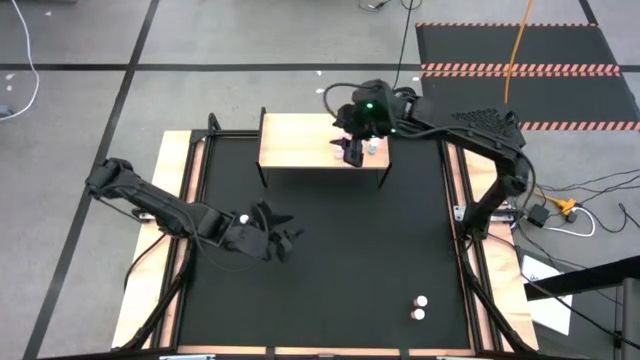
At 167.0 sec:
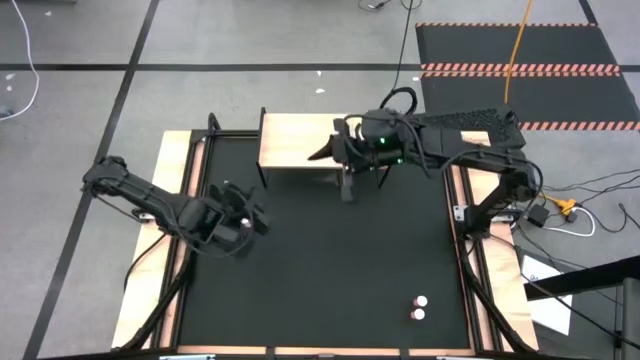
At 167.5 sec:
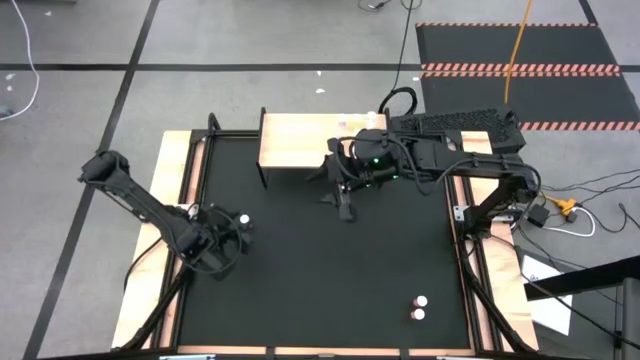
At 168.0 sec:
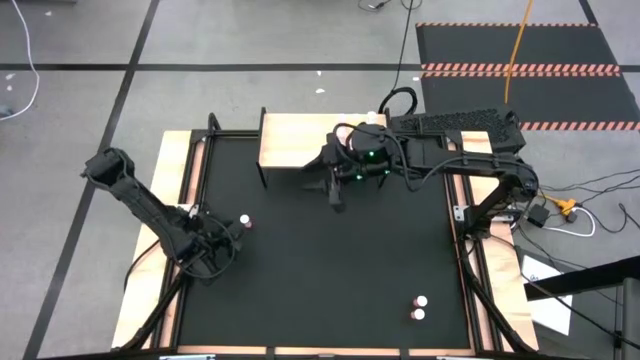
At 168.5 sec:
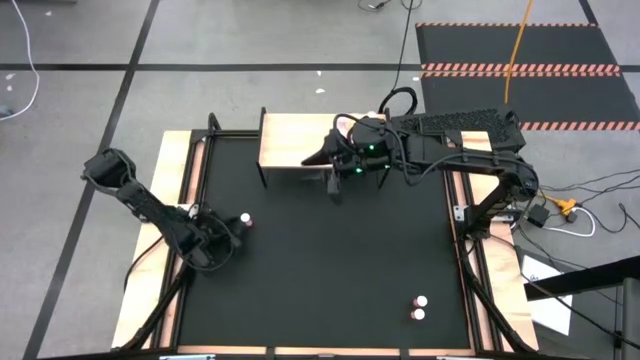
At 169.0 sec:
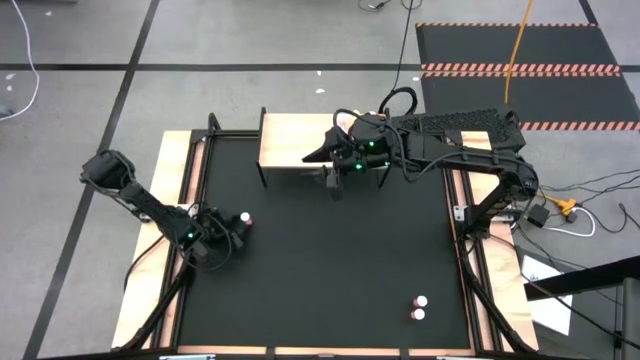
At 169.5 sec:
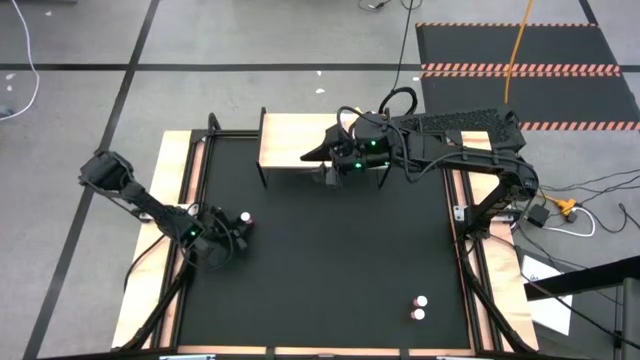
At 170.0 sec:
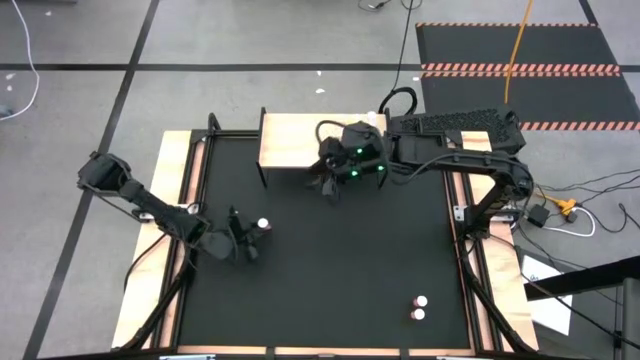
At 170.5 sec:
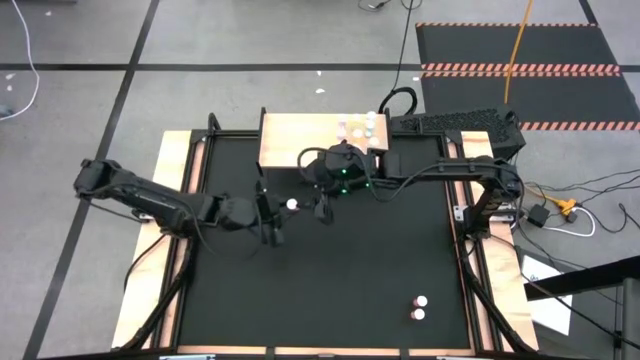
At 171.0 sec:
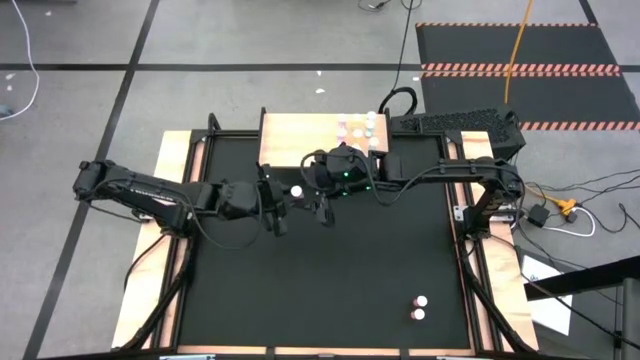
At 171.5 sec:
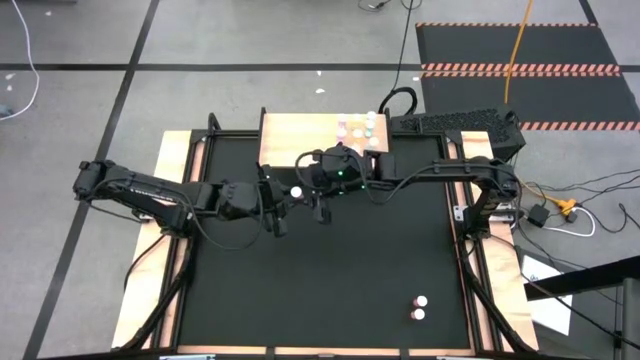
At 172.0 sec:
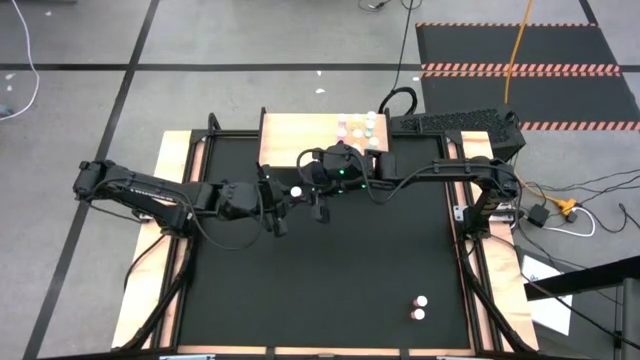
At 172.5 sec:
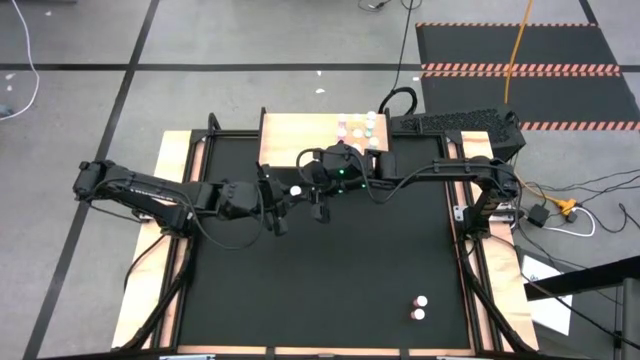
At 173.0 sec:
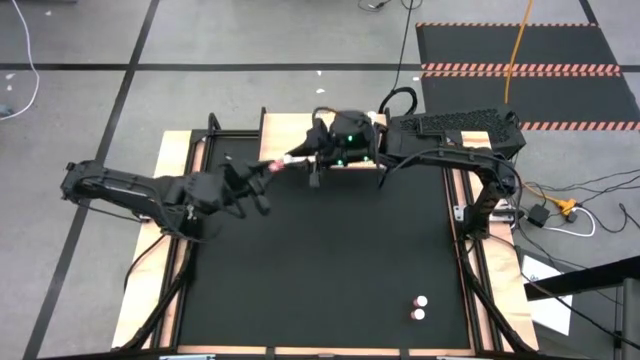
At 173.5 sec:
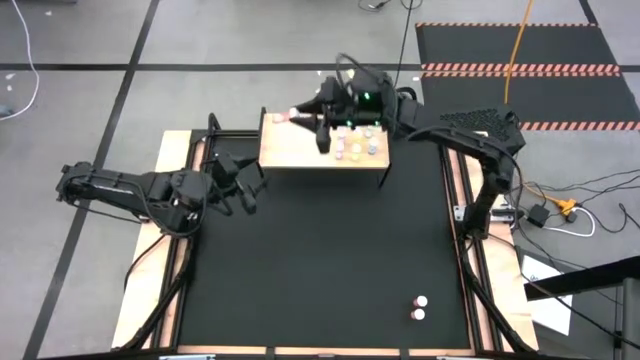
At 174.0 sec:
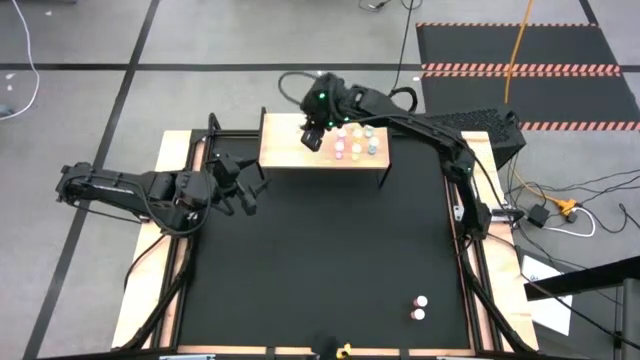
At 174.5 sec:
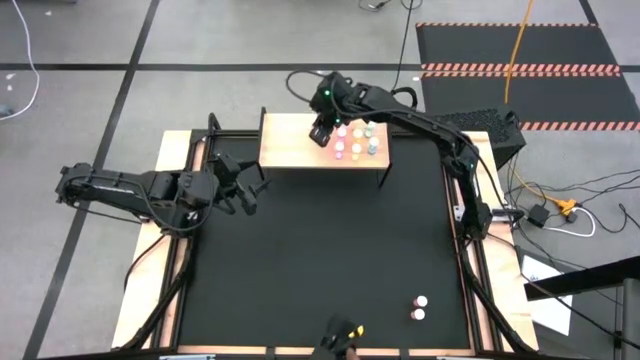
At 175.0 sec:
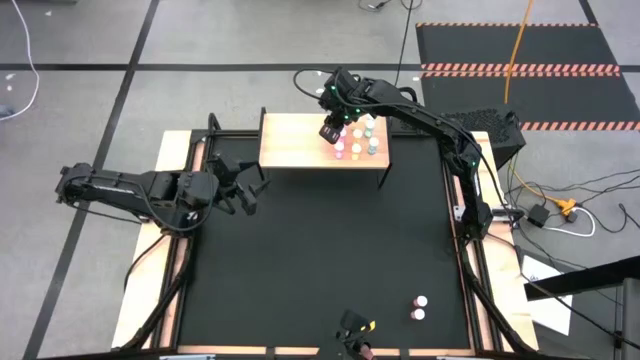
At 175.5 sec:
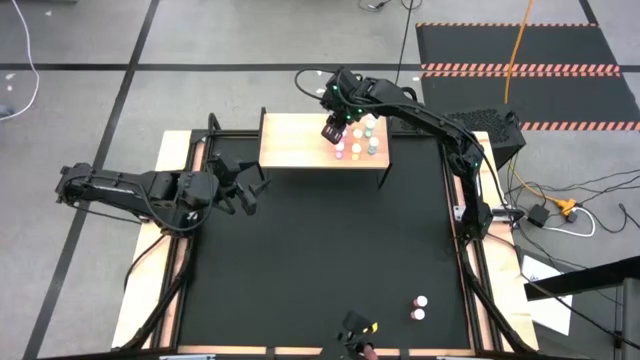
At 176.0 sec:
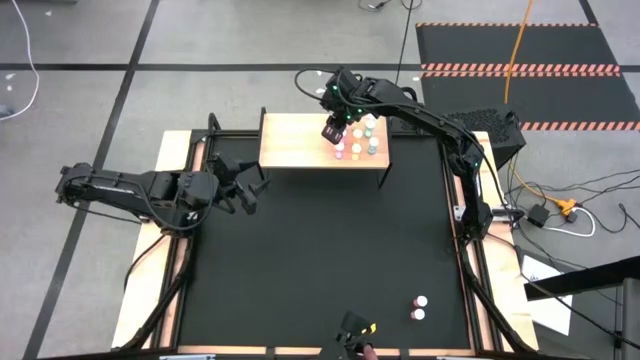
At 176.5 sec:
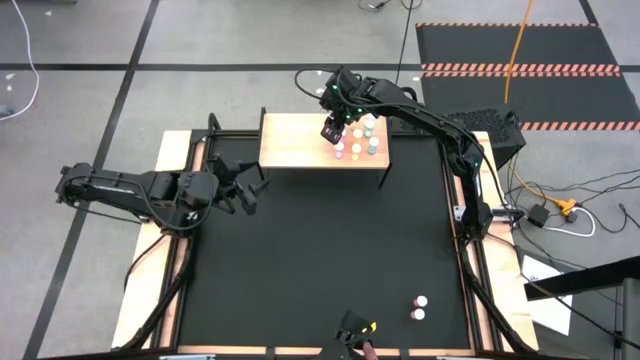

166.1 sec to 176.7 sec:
Task: Pick and place medicine bottles onto shelf by color
Put the top left orange pill bottle on the shelf

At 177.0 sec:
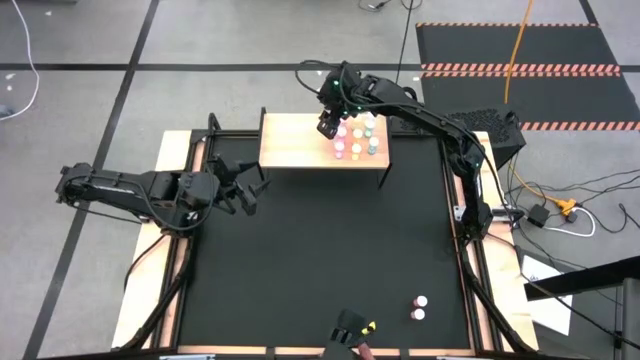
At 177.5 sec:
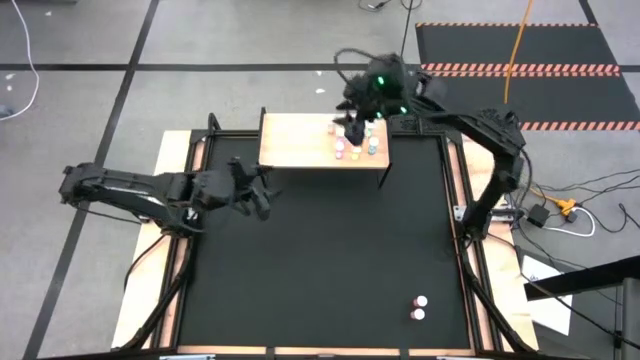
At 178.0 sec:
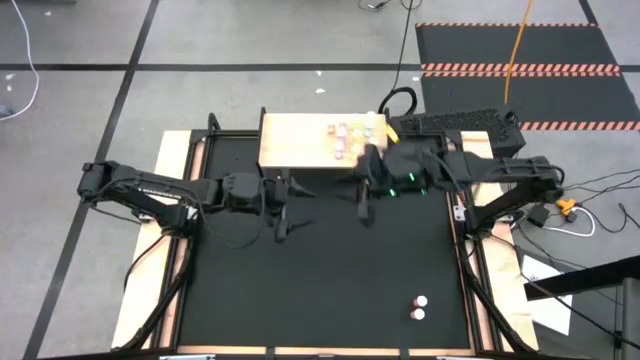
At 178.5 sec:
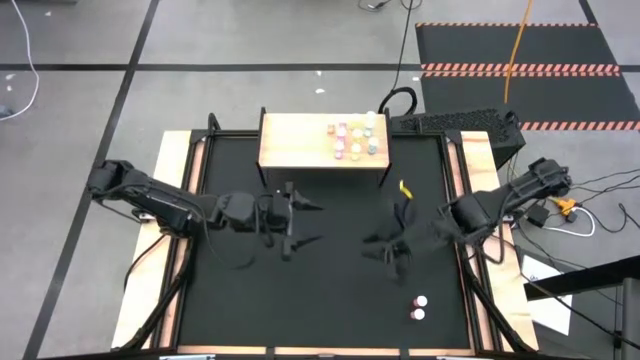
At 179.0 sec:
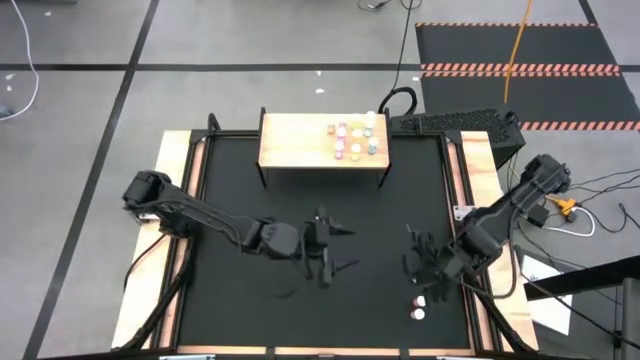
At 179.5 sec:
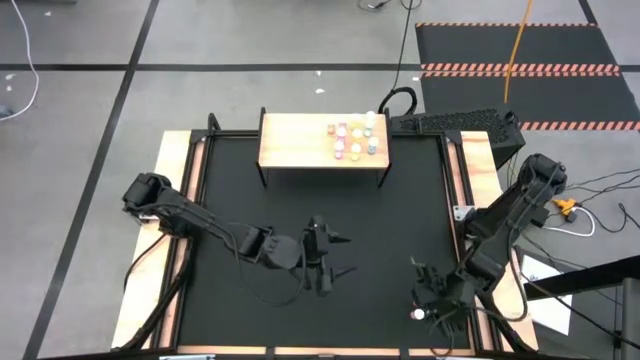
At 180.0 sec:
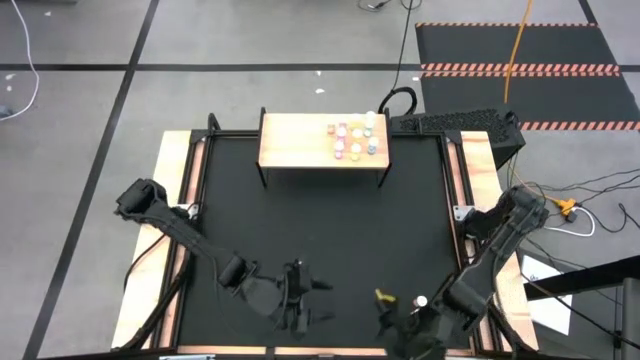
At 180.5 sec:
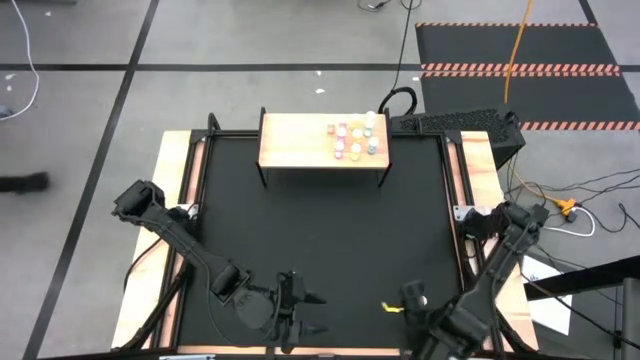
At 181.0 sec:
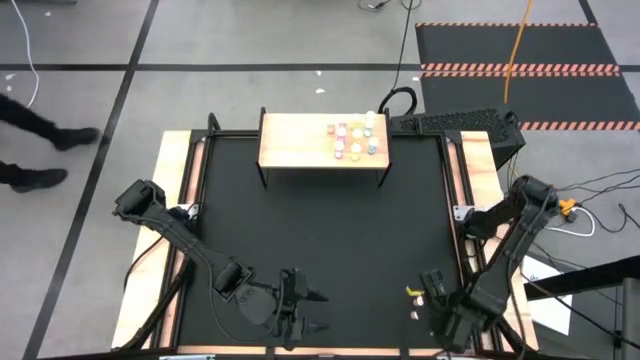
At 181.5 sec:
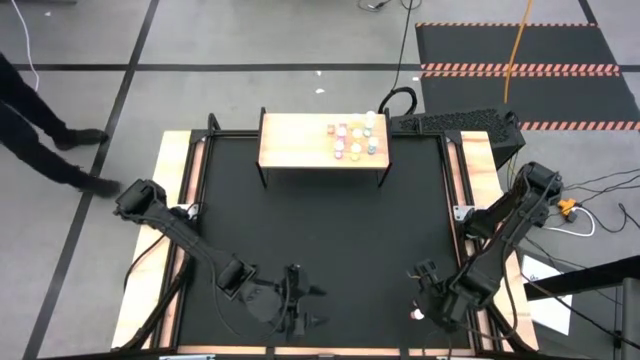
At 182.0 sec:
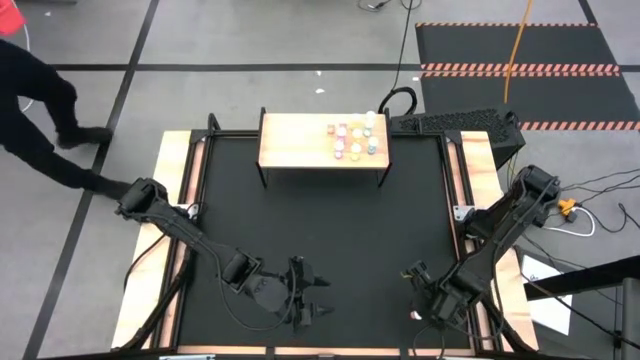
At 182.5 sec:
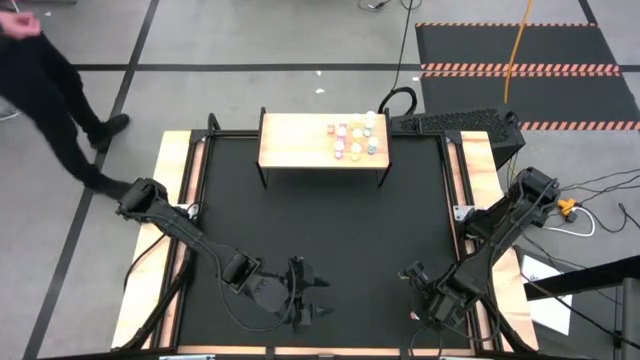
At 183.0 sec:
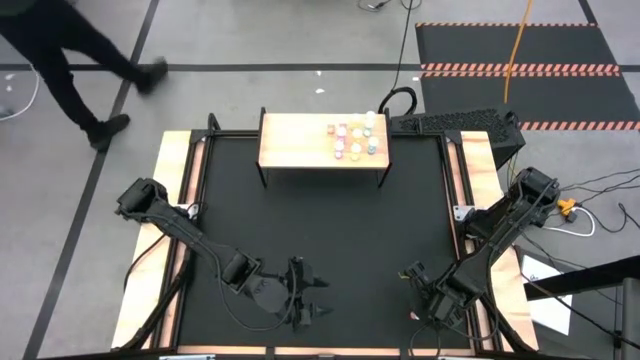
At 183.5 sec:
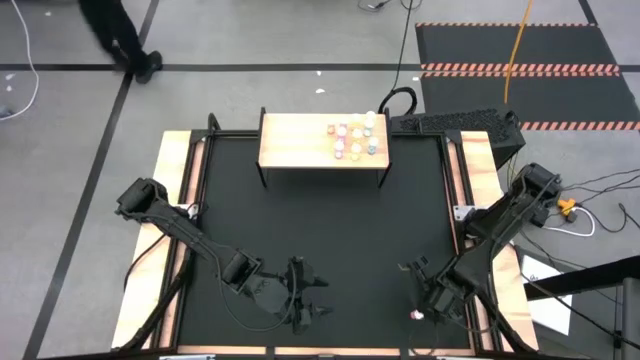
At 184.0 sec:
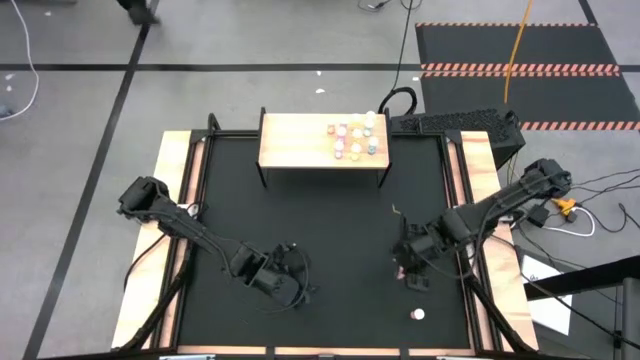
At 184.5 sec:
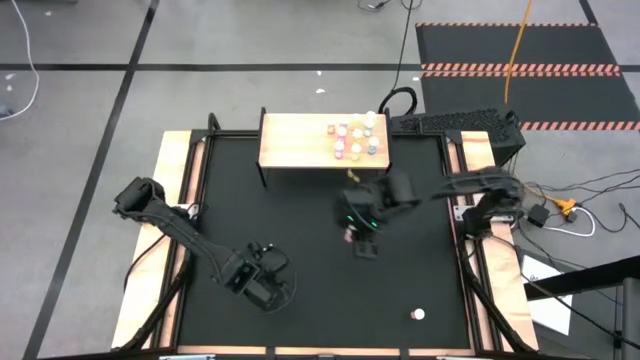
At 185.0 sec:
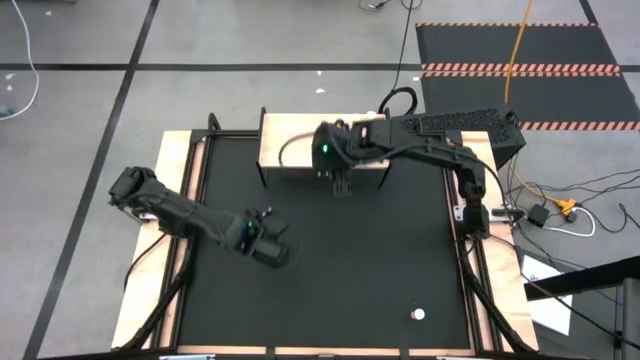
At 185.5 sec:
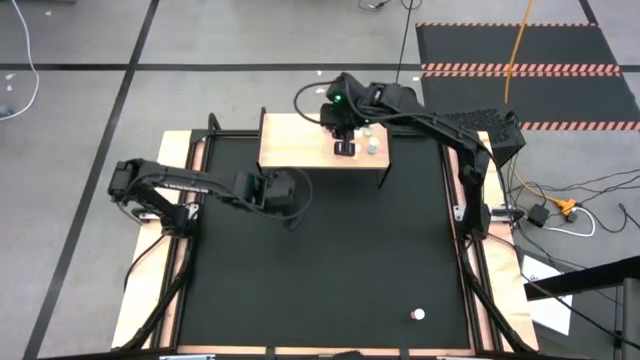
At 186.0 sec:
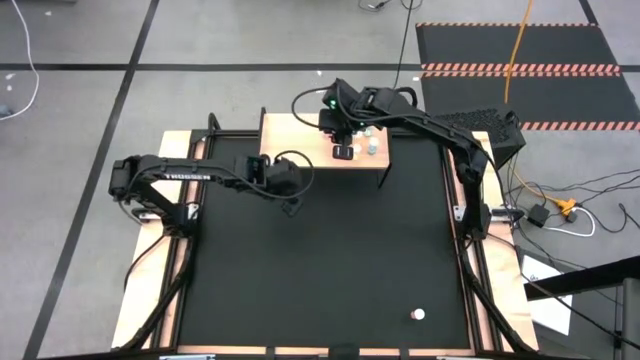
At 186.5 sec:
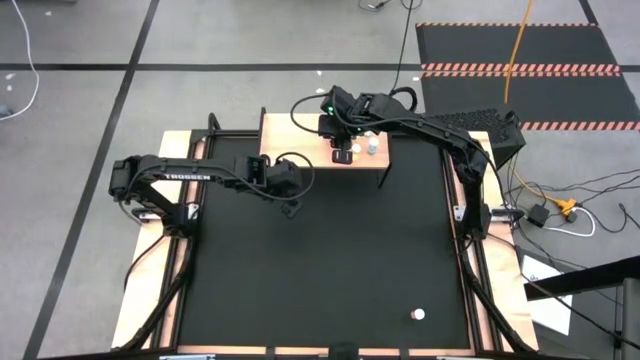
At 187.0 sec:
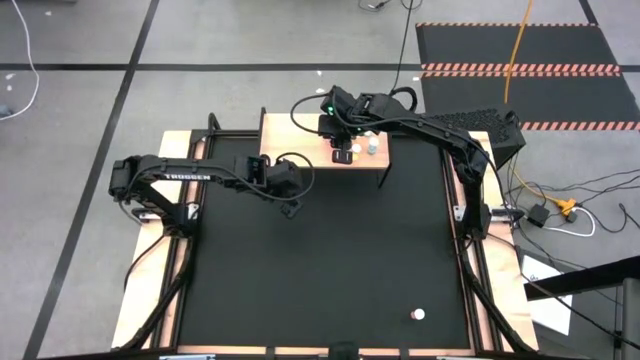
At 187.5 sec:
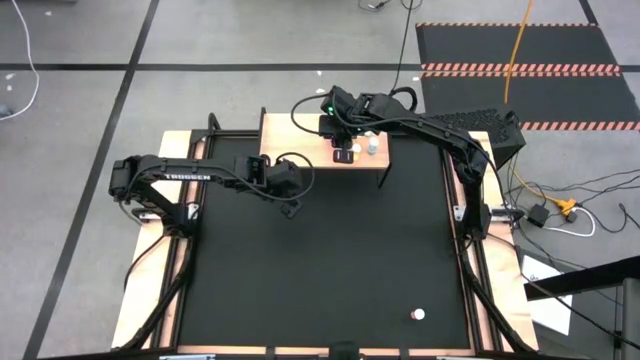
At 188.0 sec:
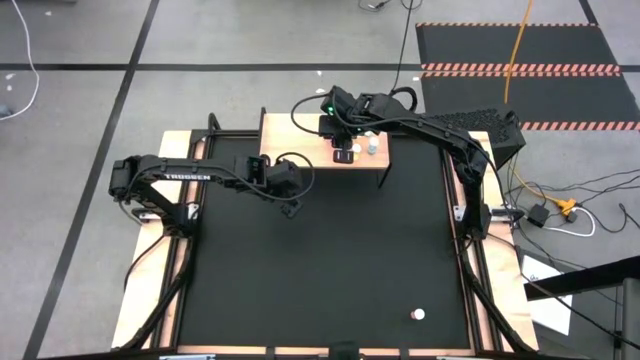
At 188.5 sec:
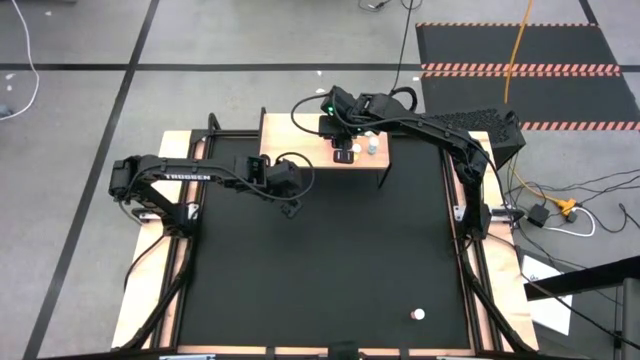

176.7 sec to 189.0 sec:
Put the top orange pill bottle on the shelf aligned with the other orange pill bottle
